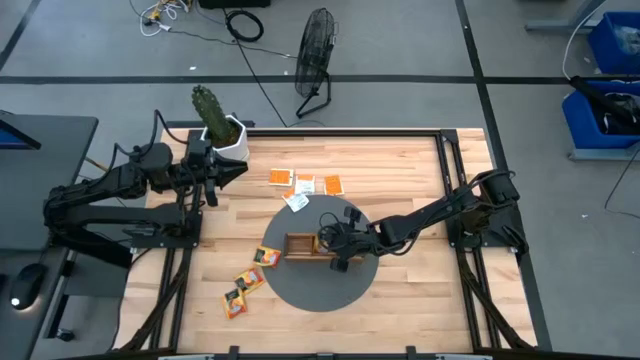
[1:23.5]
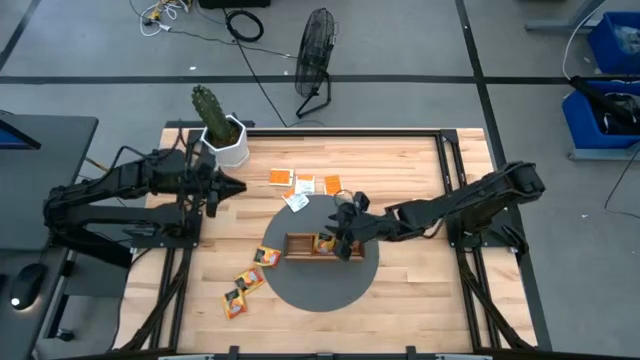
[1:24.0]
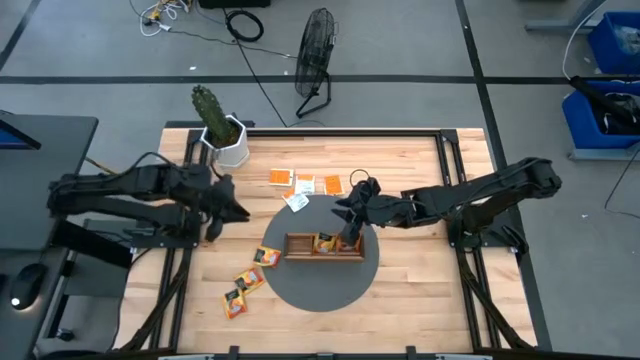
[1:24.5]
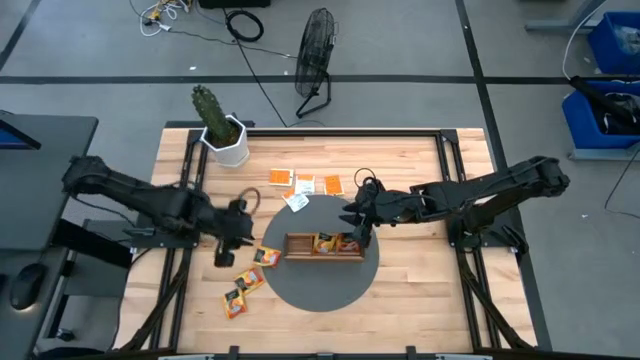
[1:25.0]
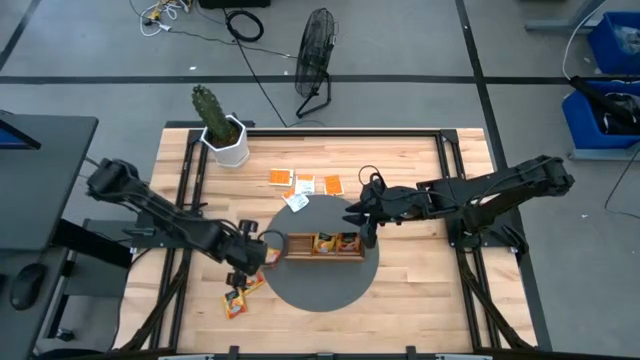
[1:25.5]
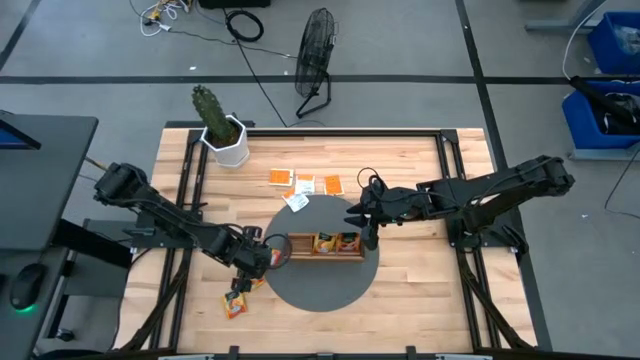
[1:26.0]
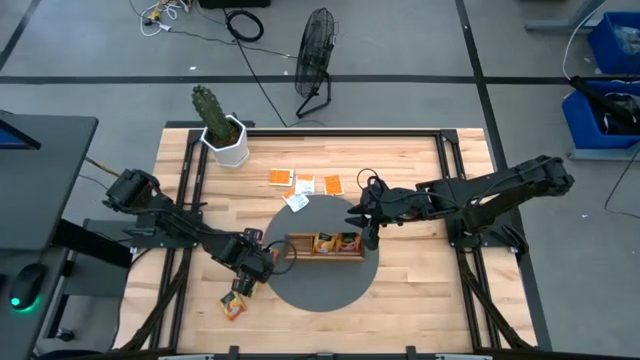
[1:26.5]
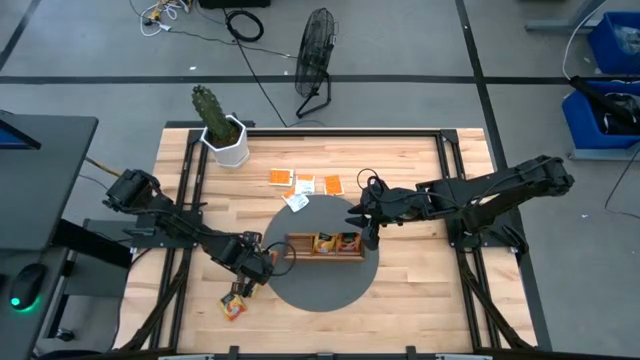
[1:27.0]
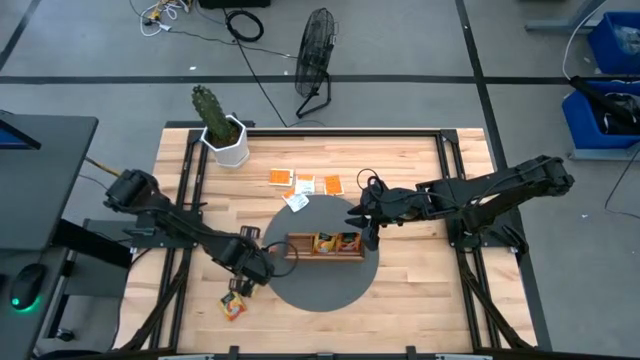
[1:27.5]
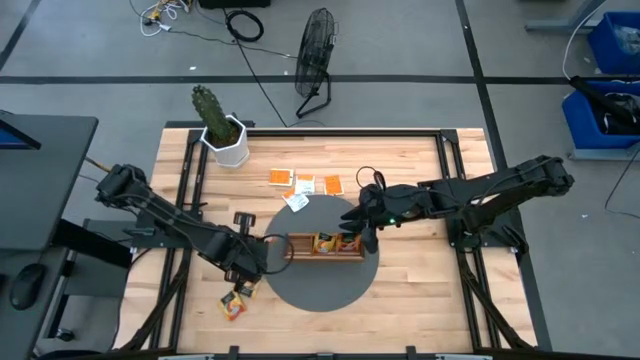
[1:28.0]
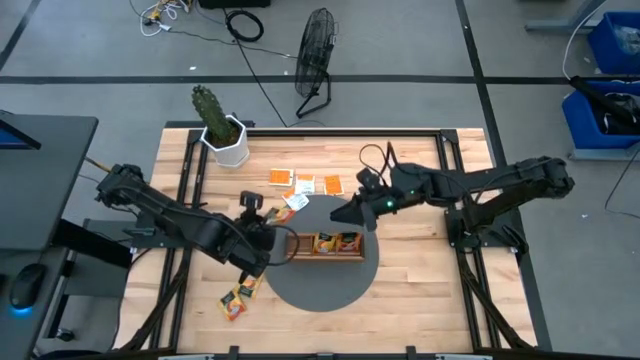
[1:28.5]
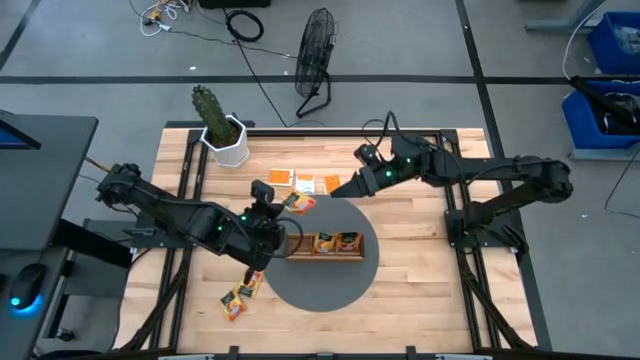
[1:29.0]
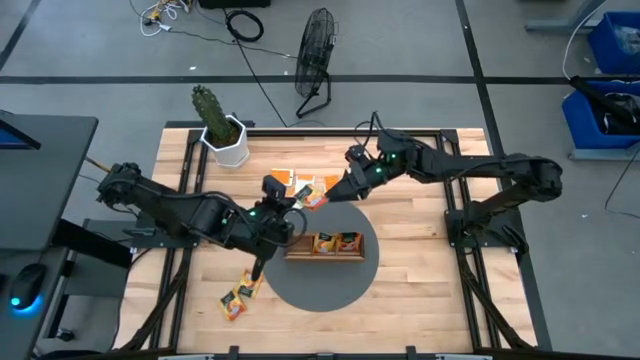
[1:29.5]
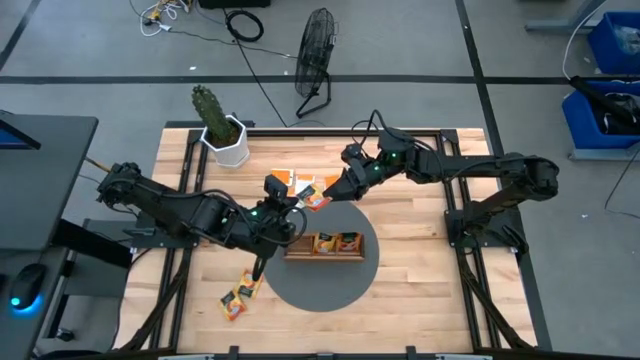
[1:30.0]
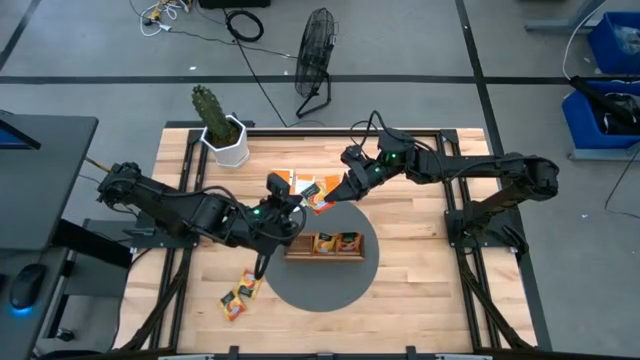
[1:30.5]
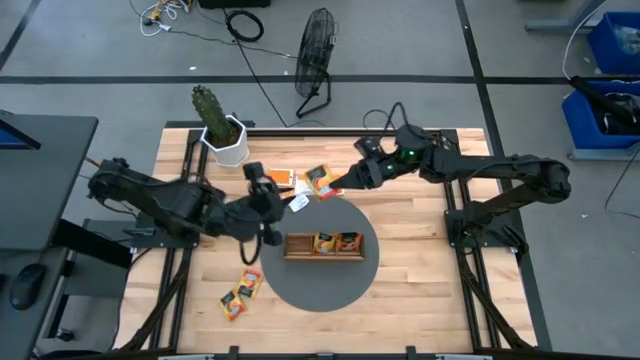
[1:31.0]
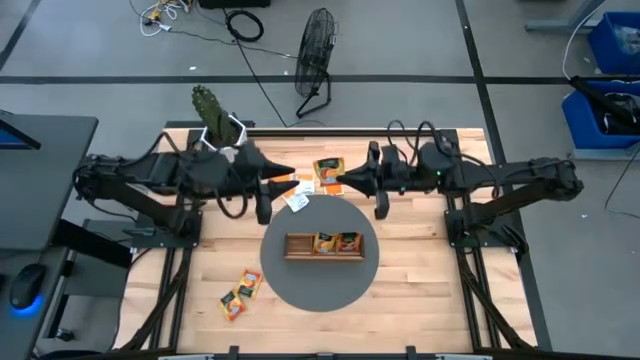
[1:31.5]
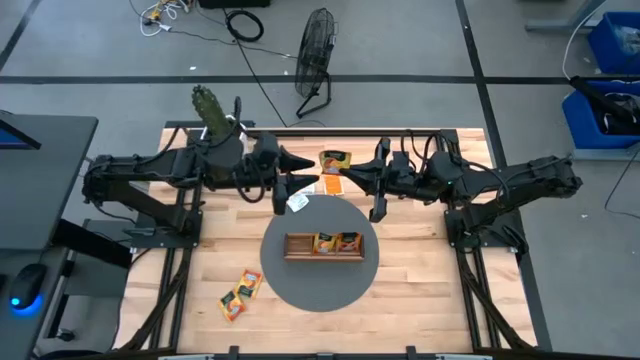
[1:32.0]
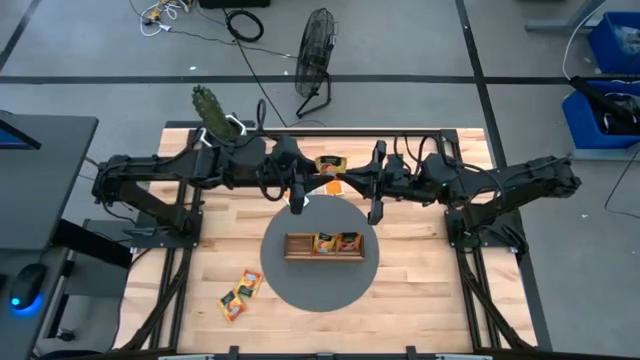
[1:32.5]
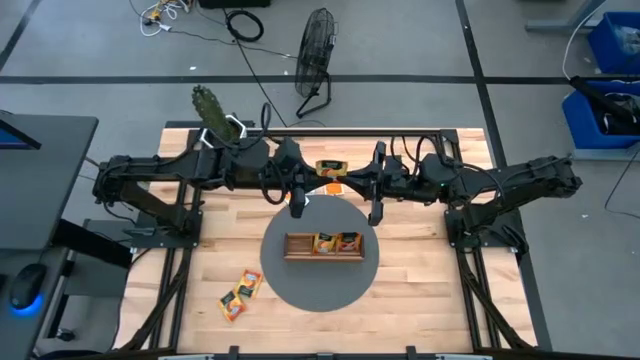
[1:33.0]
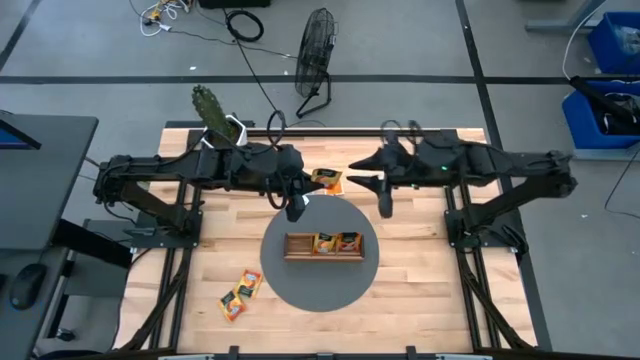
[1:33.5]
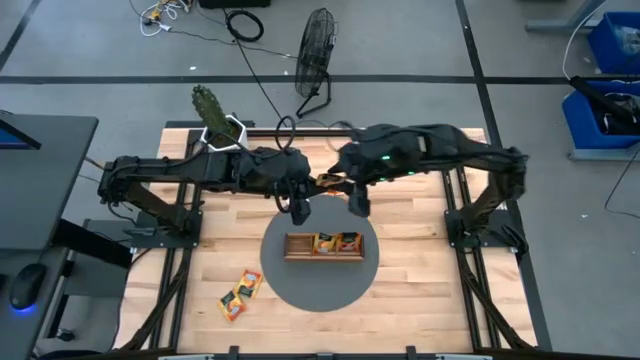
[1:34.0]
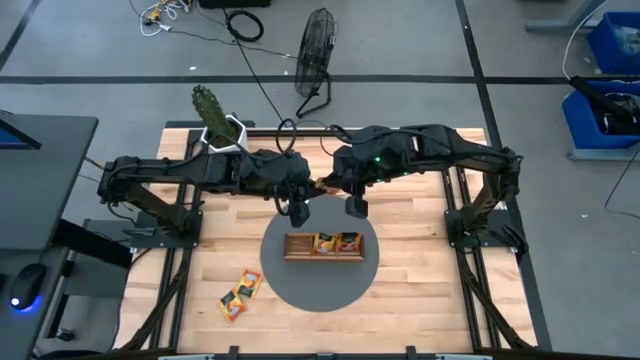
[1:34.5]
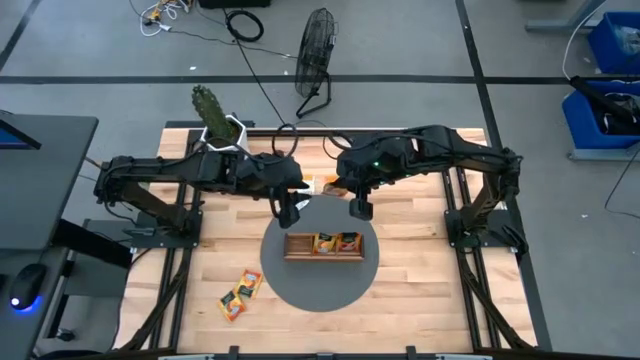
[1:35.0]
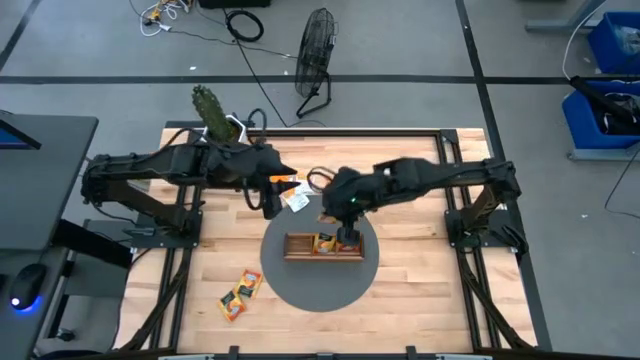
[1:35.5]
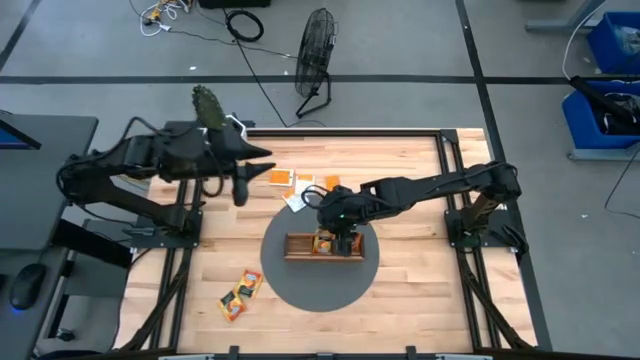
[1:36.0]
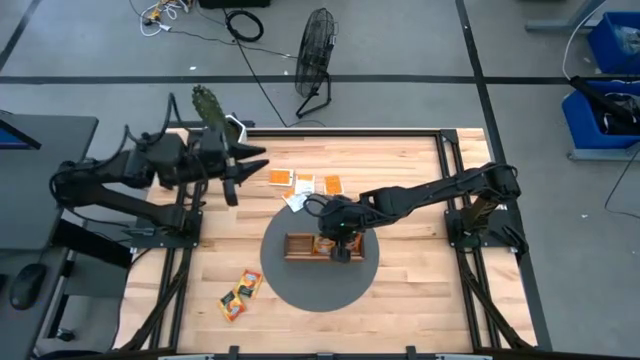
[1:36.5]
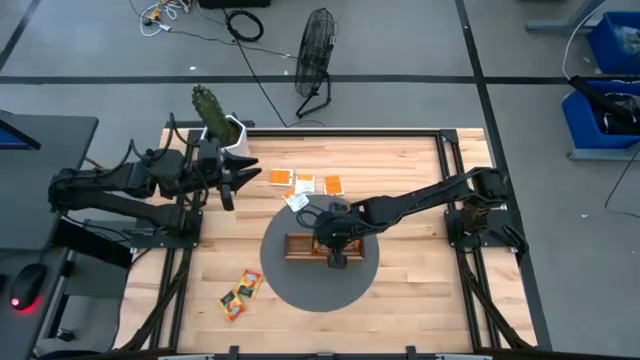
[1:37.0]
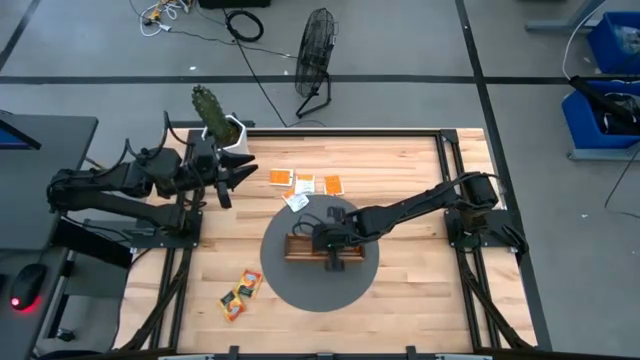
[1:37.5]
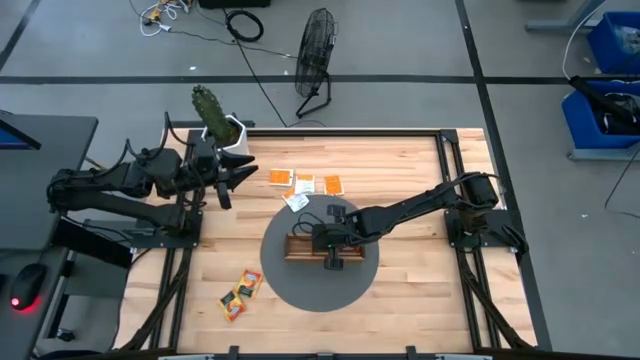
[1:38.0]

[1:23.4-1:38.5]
Task: Pick & Place Tea
Put the yellow tea bag into the middle section of the wooden organizer

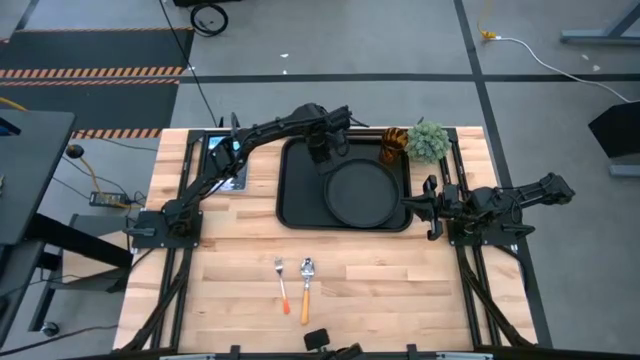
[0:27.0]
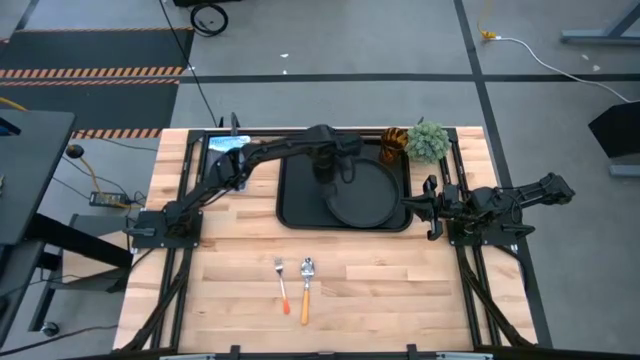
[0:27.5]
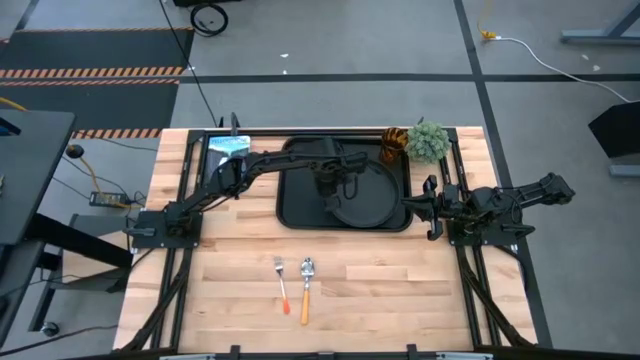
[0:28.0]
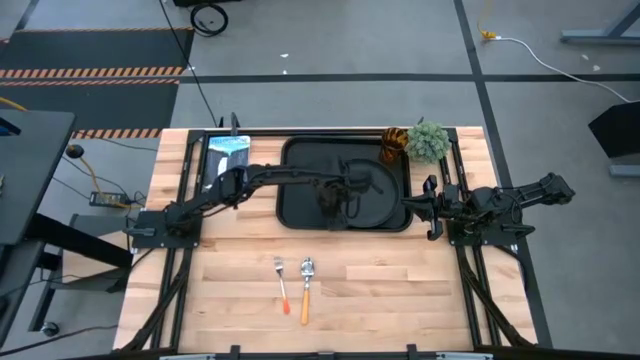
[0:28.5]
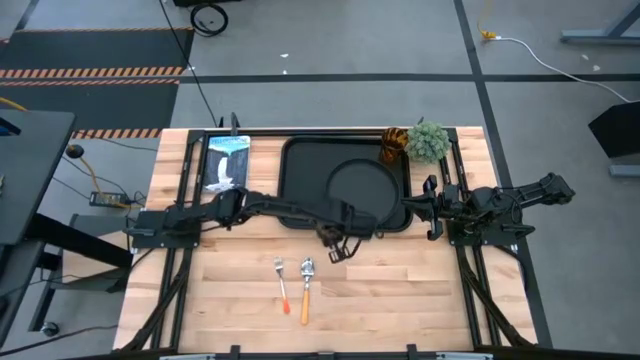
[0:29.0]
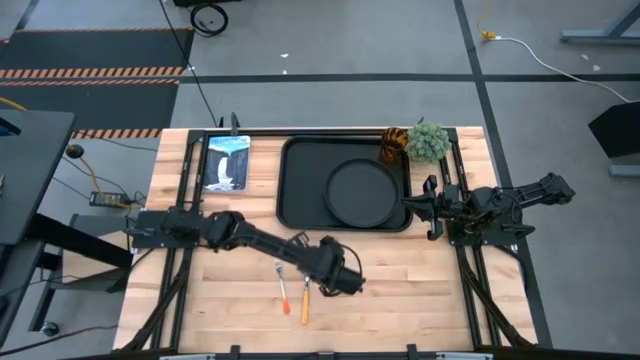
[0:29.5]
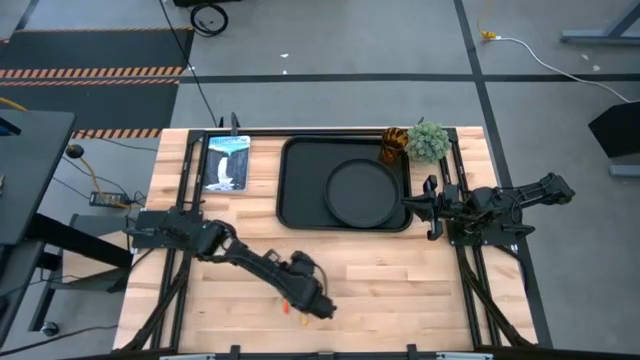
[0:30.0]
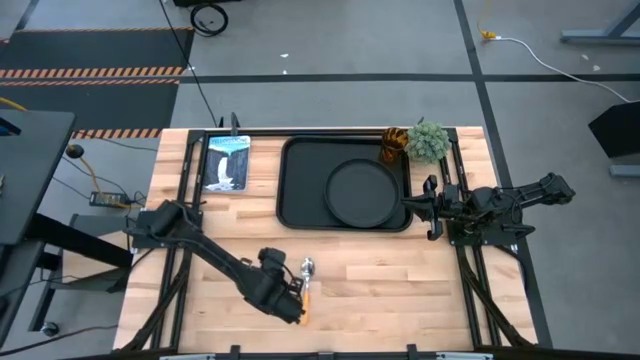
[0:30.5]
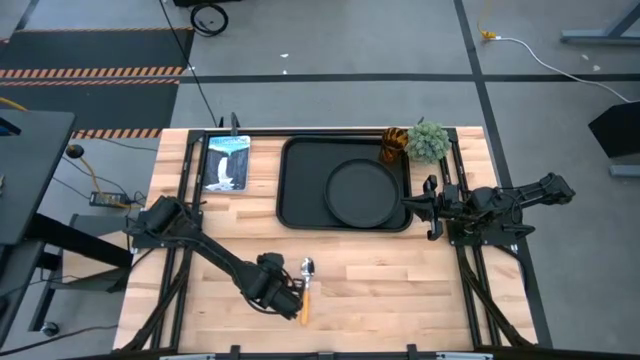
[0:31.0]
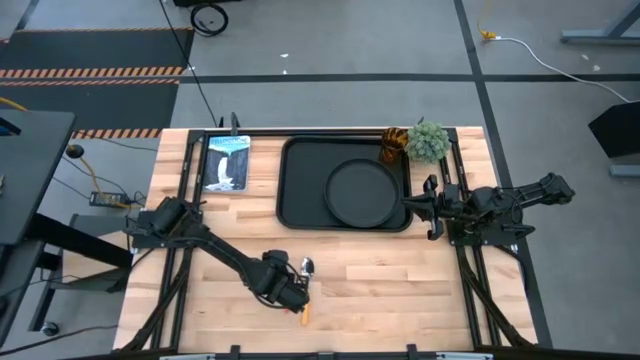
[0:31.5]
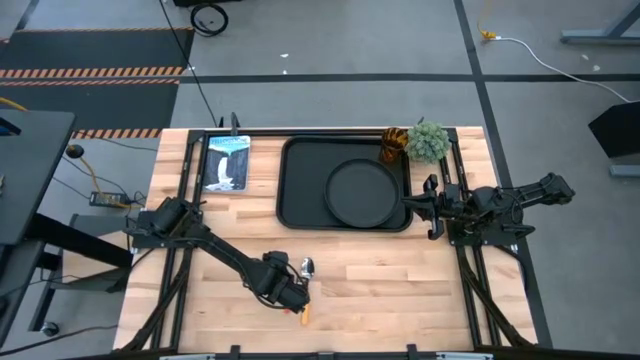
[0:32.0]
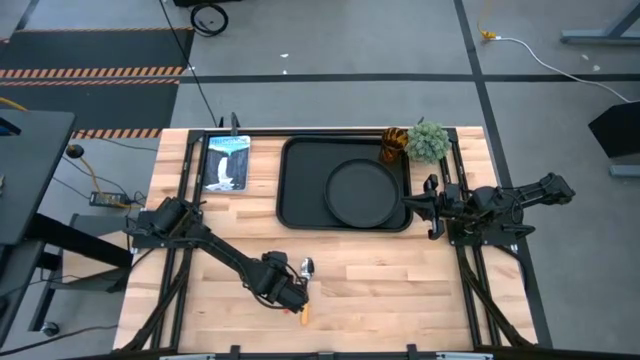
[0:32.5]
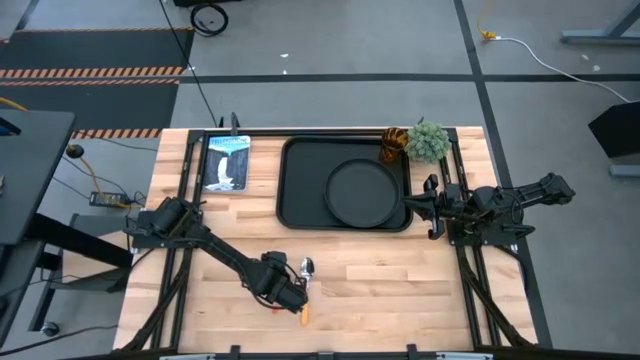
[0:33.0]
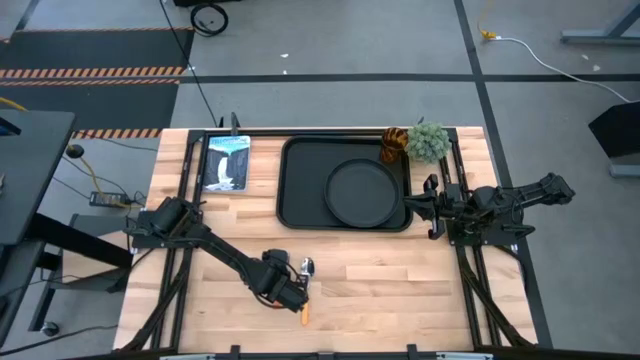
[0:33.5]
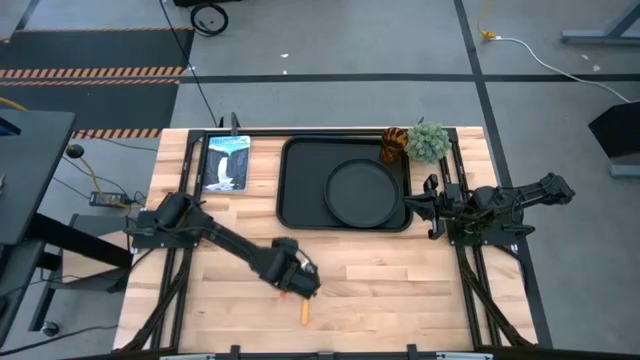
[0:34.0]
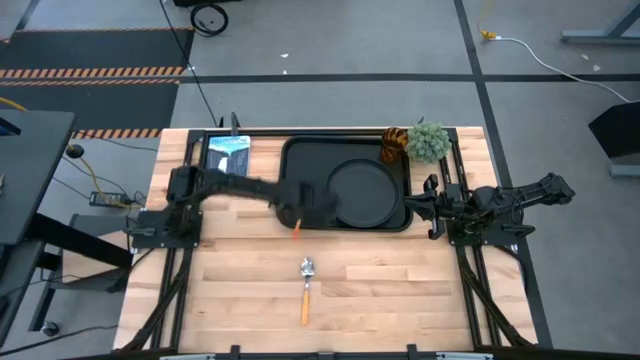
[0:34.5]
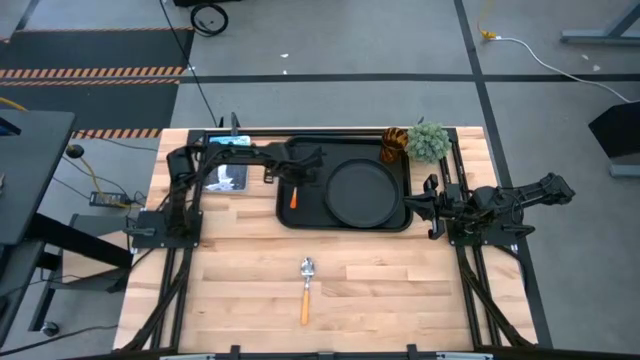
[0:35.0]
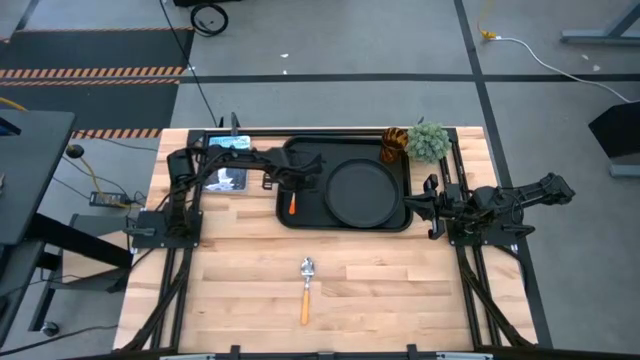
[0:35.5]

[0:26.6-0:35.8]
Task: Pick and place plate/cup/fork/spoon on tray
Put the orange fork on the left side of the black tray
